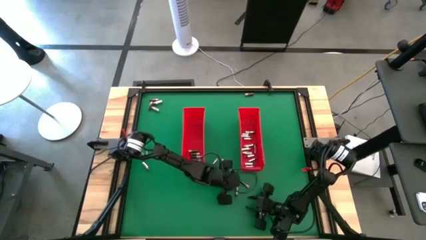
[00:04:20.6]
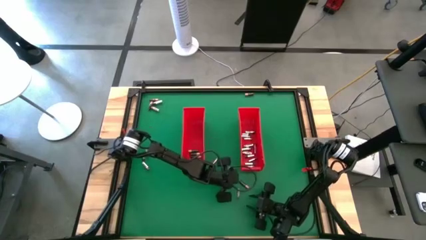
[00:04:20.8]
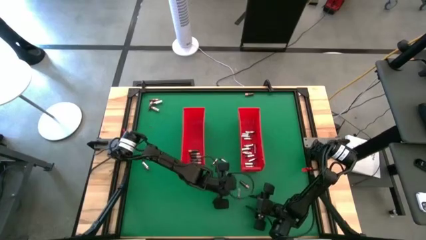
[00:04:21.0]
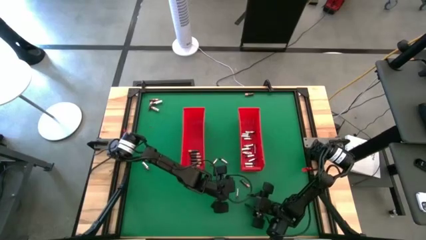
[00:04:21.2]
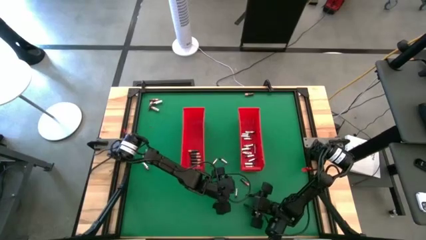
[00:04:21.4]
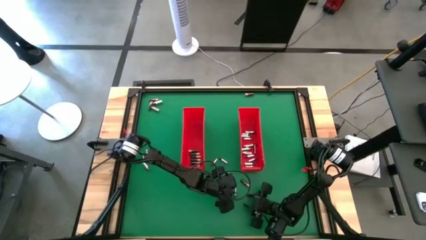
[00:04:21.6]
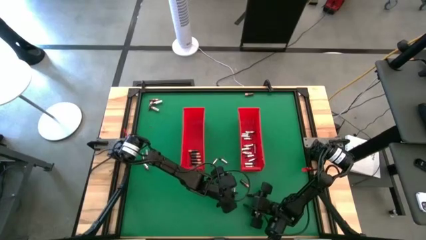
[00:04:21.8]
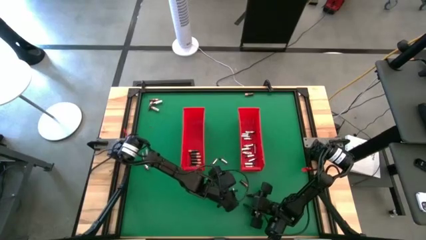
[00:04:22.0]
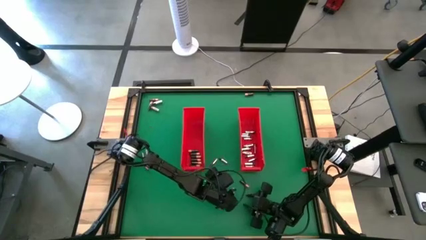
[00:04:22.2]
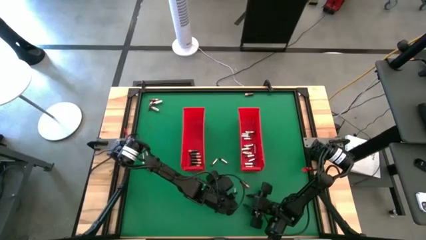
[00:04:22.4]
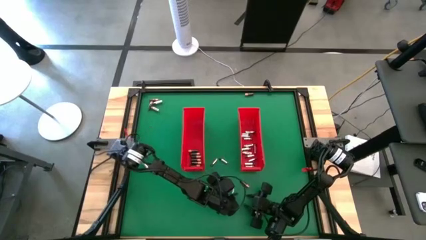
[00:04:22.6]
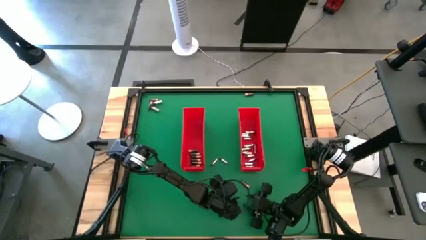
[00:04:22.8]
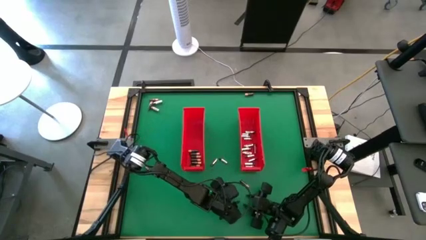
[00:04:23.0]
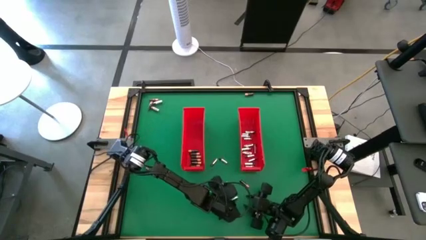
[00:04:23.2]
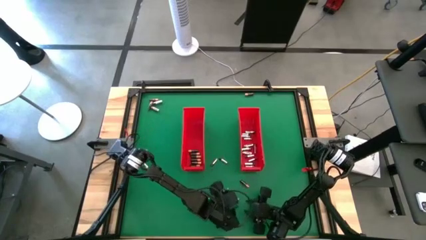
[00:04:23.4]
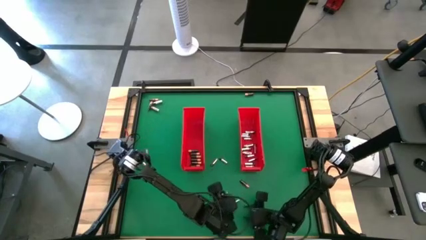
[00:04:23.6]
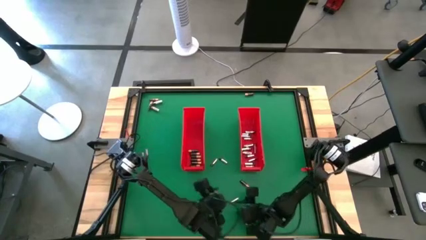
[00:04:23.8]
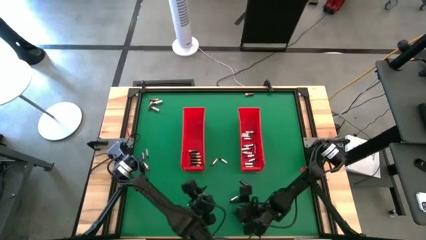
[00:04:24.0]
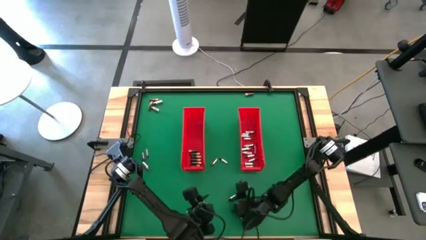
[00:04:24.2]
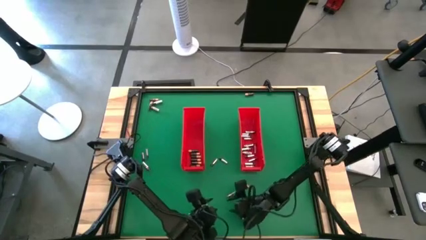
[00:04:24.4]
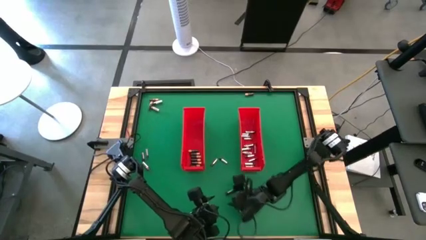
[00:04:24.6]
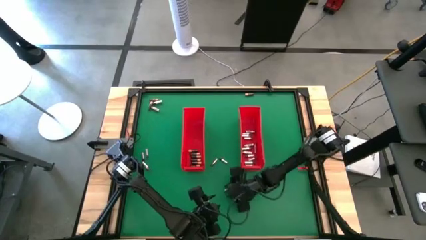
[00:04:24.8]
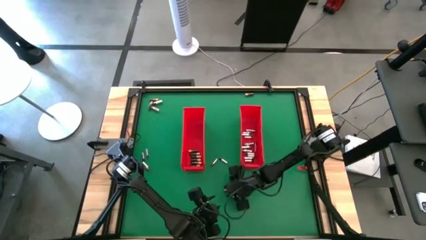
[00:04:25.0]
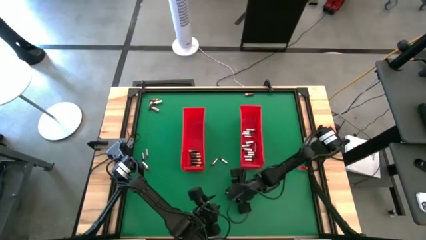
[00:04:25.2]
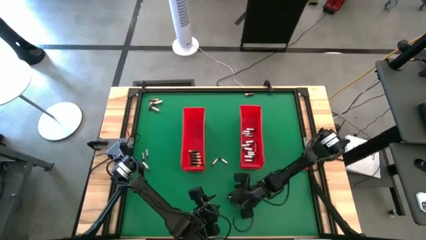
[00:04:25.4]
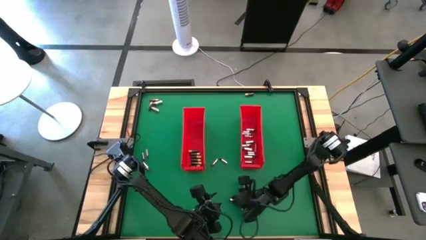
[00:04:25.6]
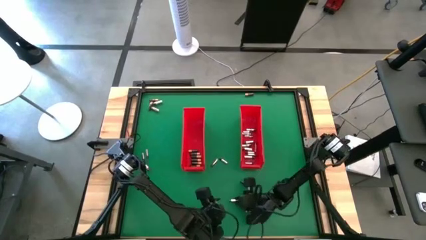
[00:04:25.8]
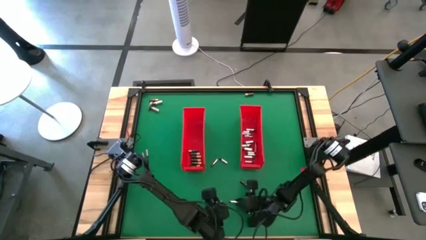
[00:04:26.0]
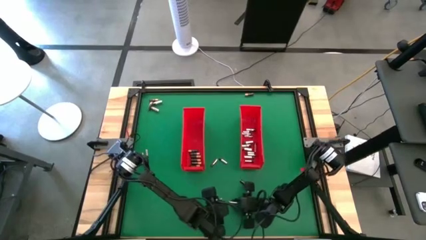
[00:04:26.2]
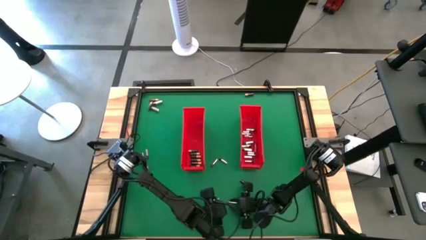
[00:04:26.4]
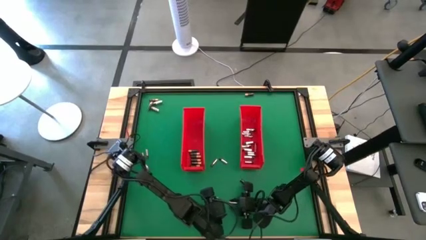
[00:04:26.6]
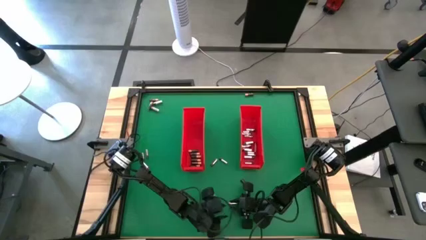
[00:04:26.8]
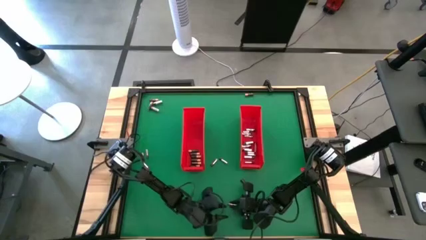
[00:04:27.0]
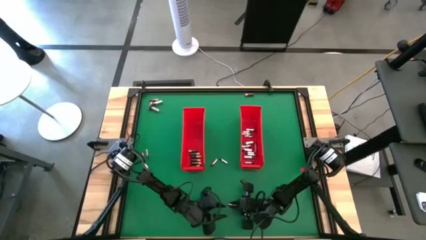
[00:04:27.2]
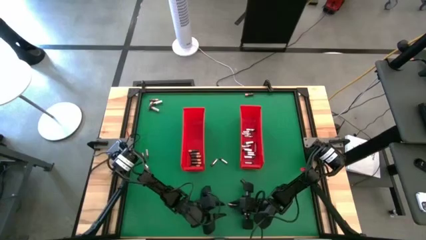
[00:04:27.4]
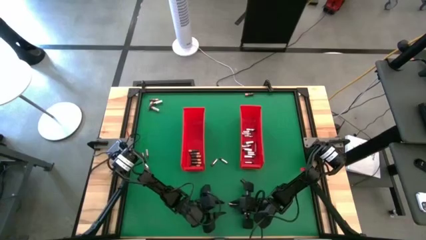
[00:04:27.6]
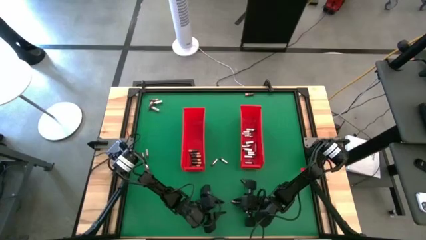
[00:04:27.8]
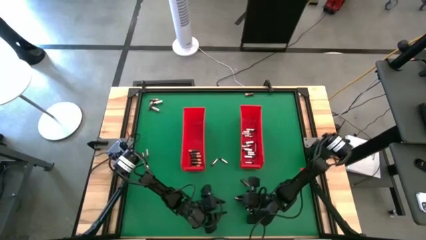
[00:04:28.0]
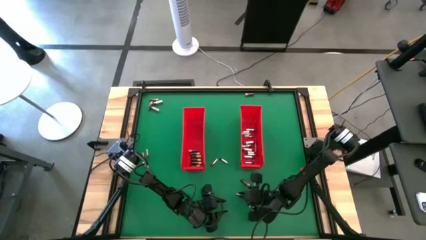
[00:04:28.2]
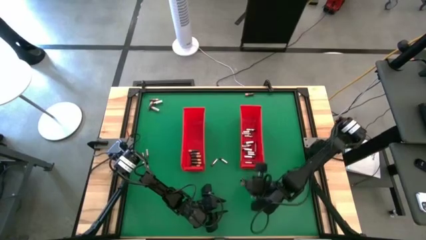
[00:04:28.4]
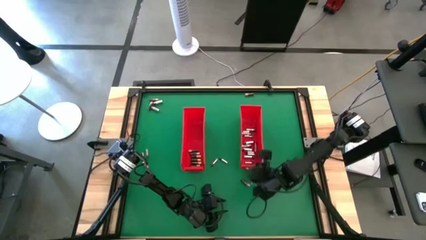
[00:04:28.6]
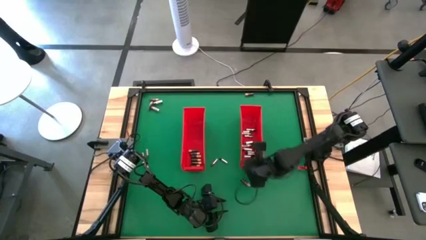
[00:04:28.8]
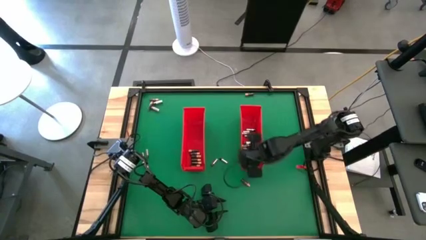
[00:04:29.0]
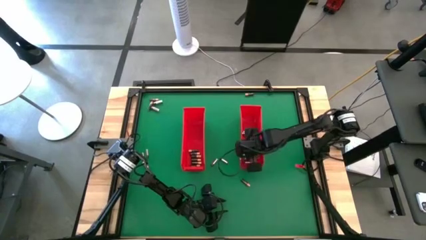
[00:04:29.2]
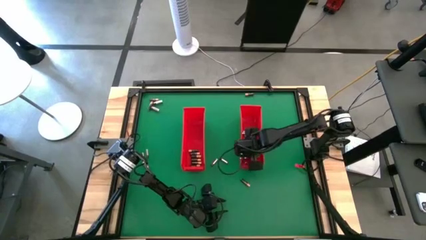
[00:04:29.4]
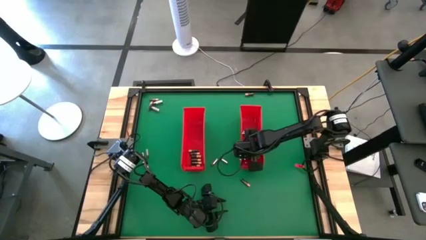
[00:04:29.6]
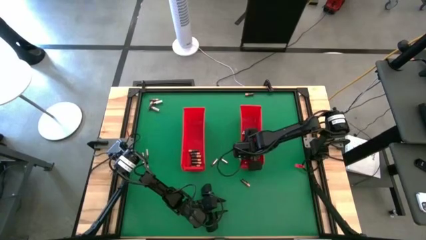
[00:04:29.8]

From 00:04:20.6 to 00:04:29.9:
Task: Sort batteries
Put the silver battery into the right red bin

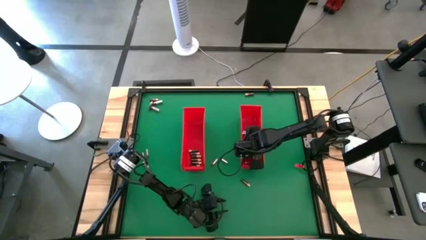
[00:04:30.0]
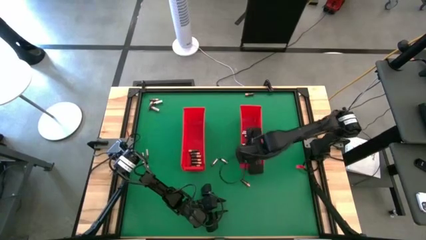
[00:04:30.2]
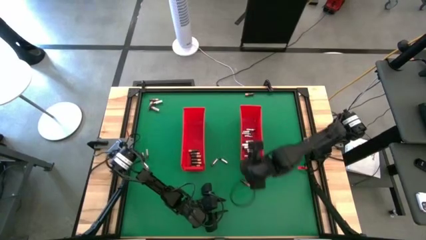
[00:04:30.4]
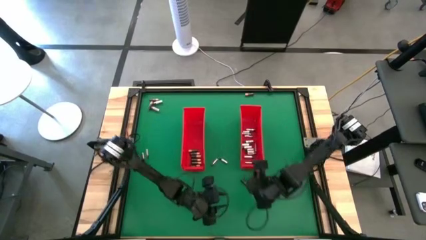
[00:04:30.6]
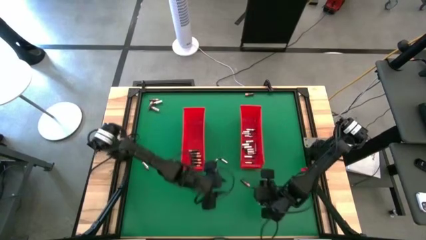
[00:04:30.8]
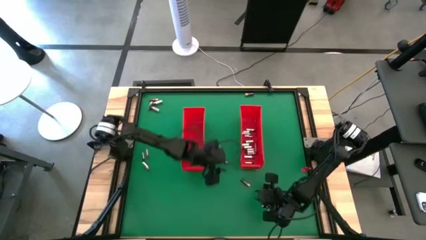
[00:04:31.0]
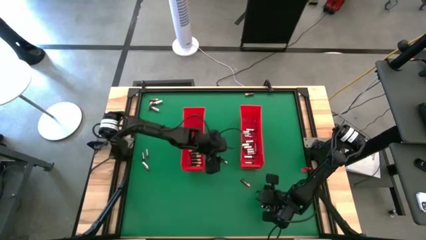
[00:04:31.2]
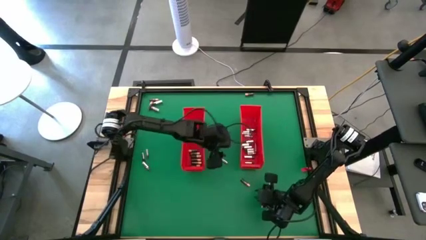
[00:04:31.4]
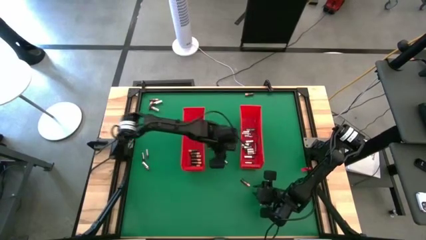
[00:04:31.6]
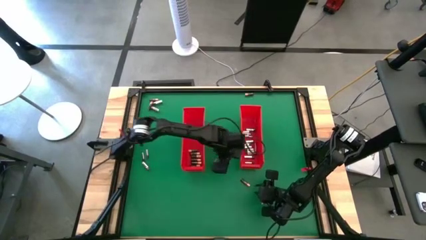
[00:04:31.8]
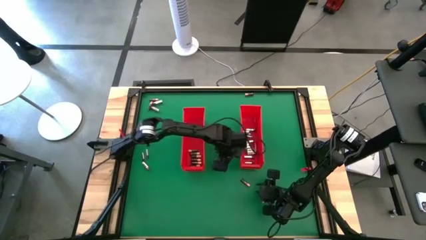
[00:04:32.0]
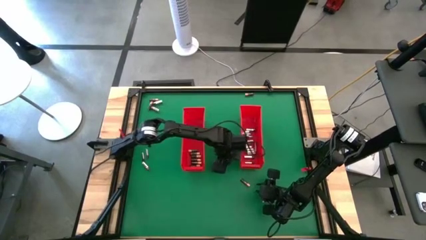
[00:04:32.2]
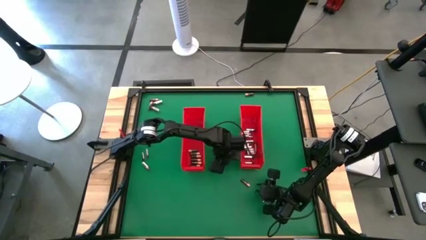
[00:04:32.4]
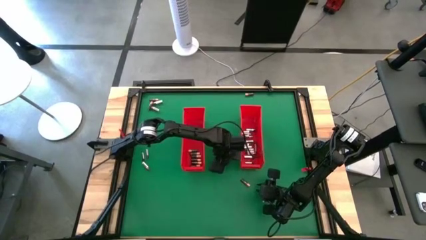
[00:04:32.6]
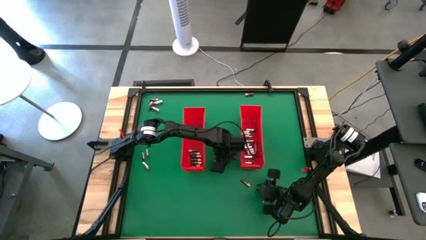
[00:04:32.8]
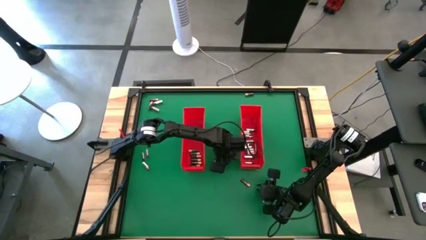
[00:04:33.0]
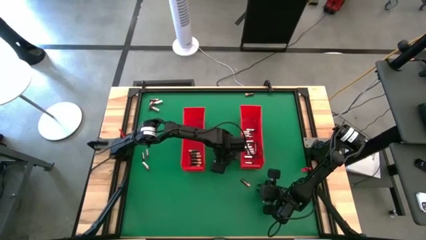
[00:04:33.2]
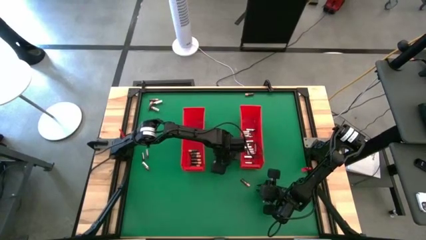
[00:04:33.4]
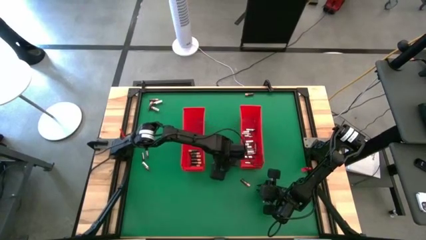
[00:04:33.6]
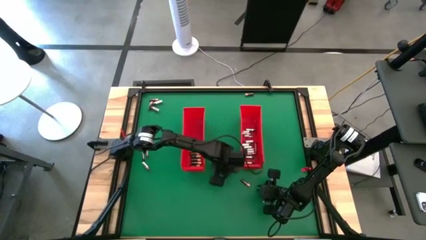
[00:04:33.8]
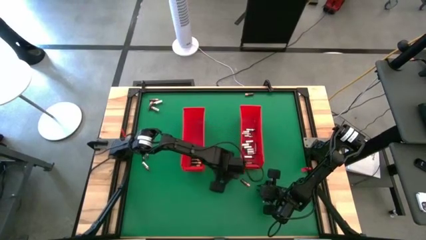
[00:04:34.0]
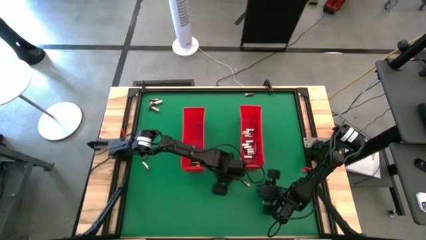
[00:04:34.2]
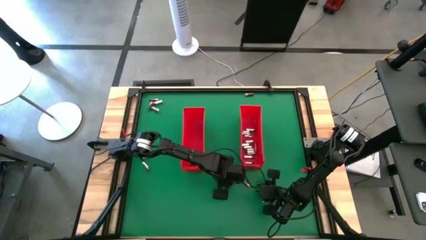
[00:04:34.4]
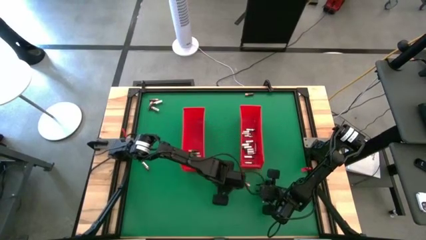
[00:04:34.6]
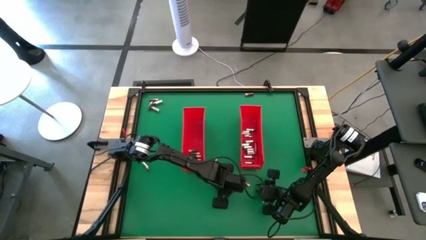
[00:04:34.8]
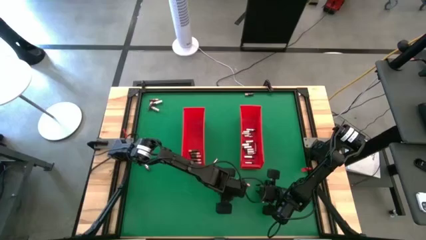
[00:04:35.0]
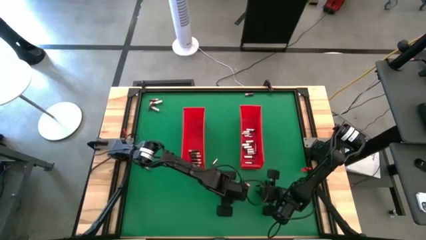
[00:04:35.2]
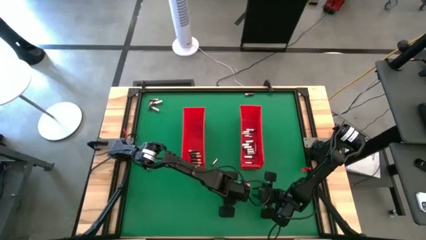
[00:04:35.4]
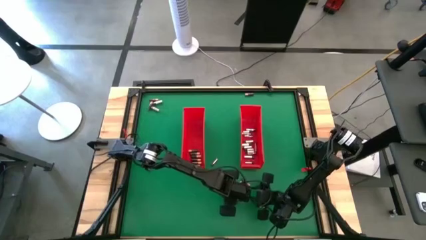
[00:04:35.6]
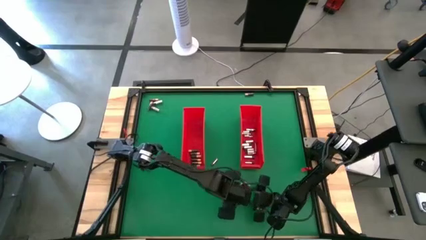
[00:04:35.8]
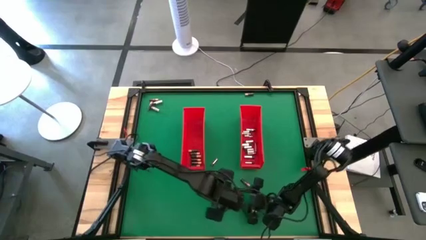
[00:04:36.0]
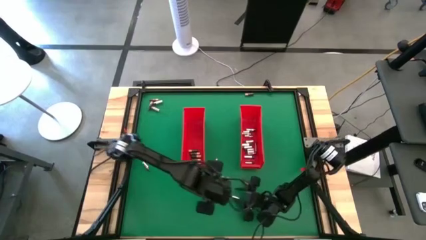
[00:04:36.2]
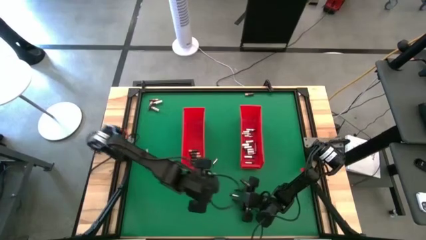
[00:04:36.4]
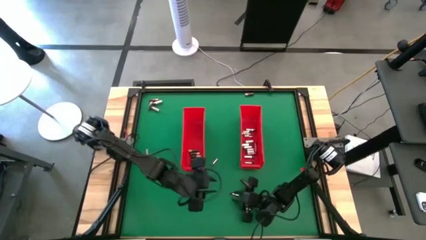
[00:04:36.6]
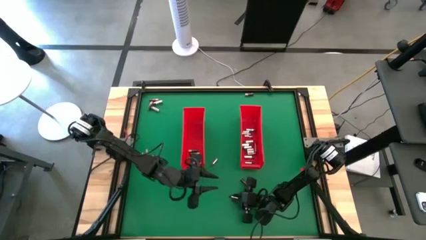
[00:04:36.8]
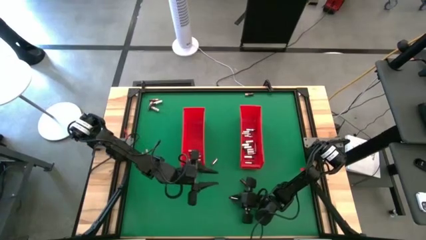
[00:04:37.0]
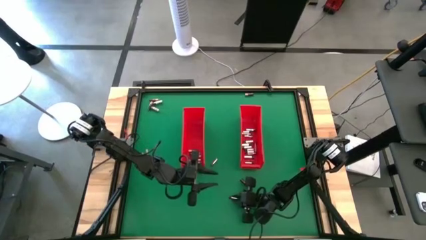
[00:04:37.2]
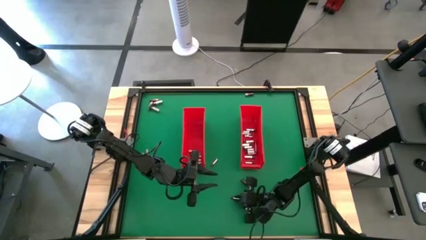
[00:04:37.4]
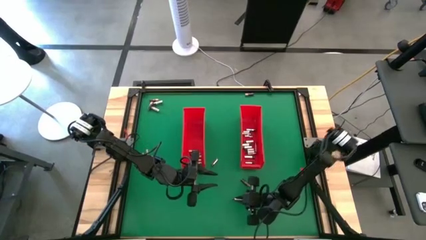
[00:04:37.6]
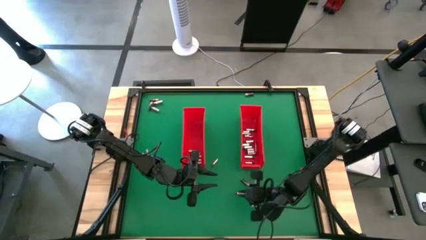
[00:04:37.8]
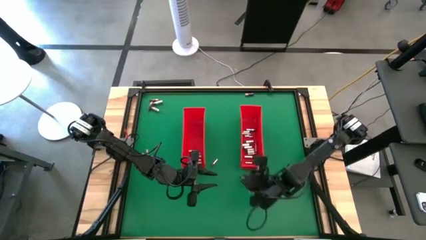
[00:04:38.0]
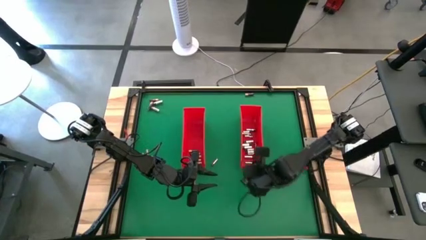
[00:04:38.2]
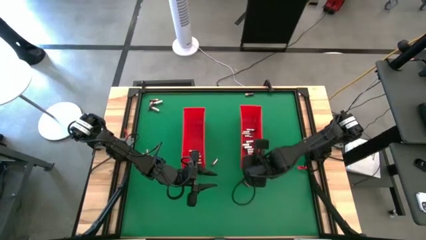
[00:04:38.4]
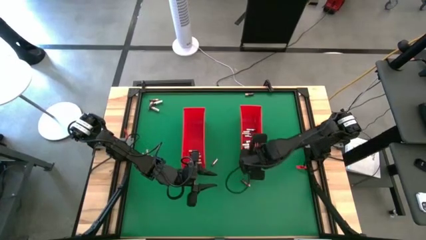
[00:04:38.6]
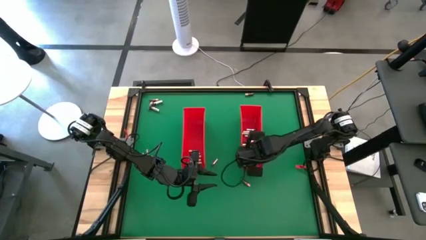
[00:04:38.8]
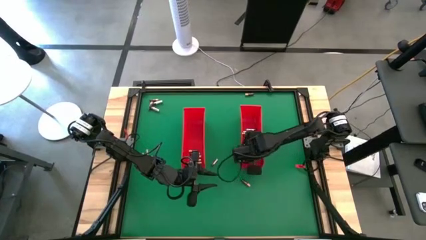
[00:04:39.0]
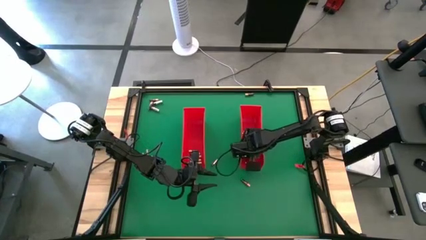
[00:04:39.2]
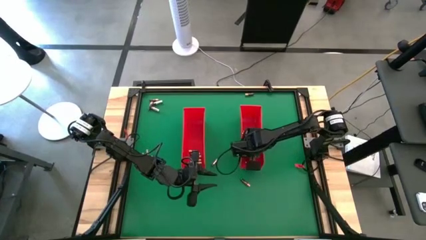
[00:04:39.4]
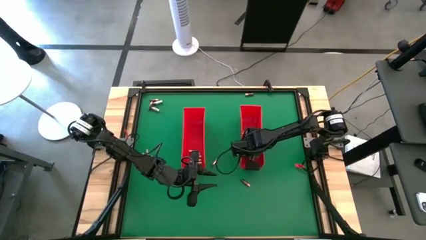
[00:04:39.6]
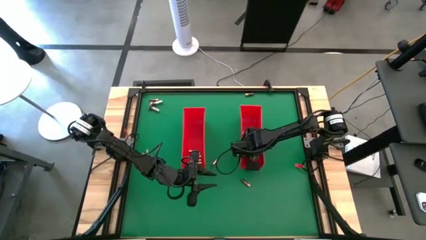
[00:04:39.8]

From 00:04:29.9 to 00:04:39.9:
Put the silver battery into the right red bin
